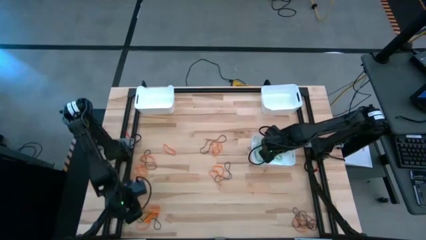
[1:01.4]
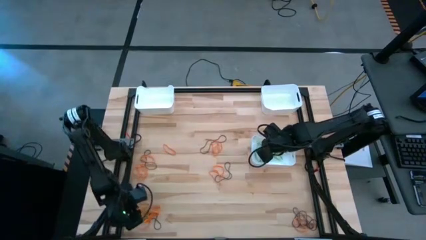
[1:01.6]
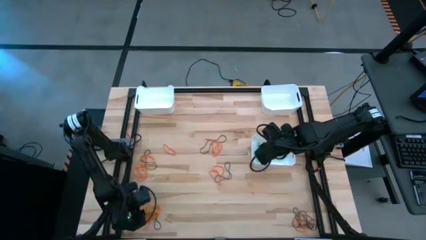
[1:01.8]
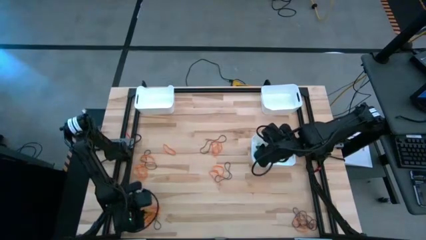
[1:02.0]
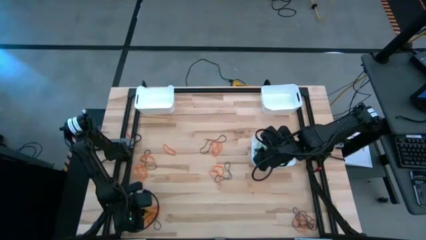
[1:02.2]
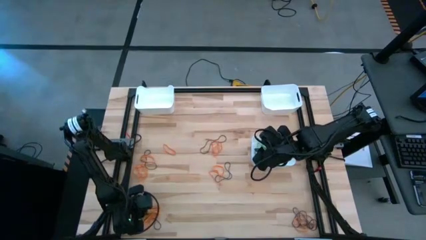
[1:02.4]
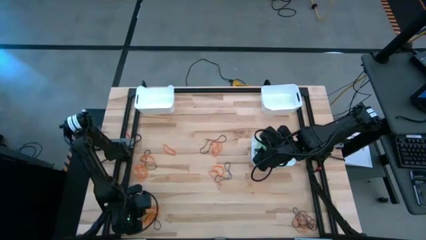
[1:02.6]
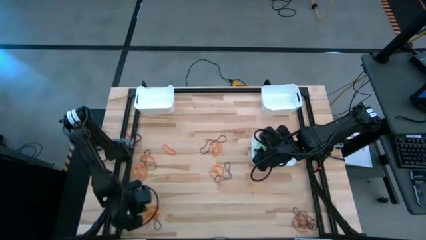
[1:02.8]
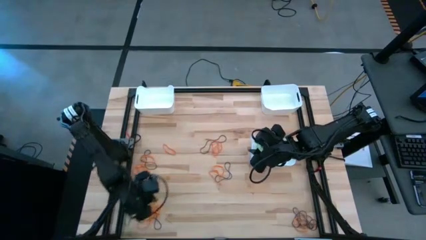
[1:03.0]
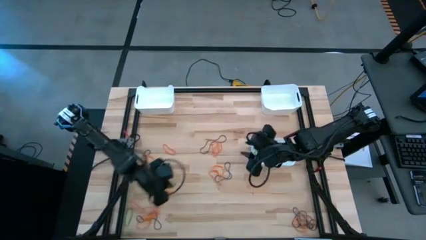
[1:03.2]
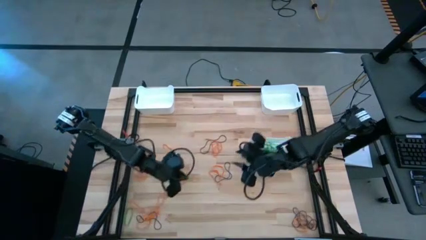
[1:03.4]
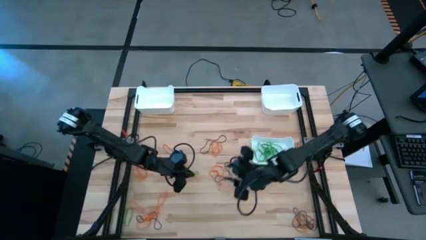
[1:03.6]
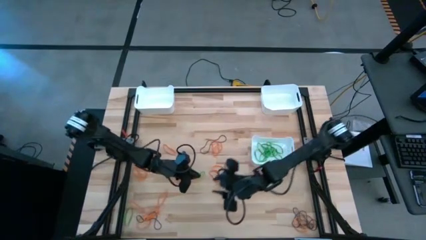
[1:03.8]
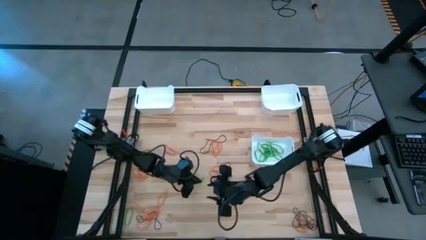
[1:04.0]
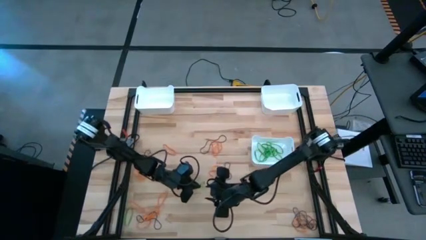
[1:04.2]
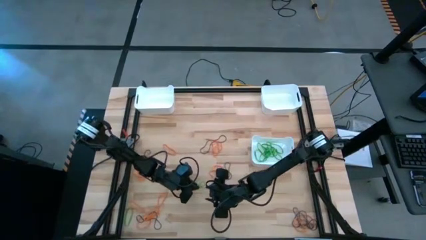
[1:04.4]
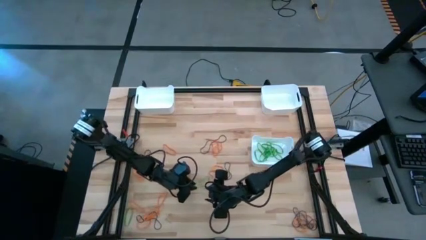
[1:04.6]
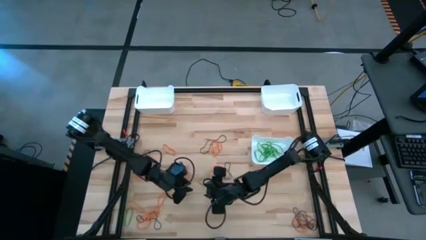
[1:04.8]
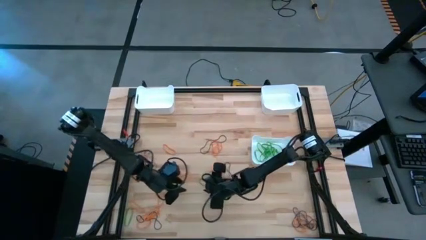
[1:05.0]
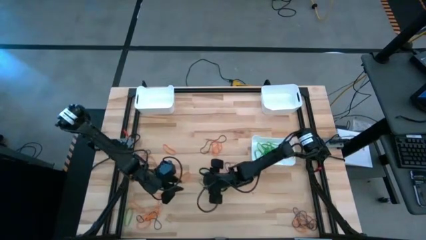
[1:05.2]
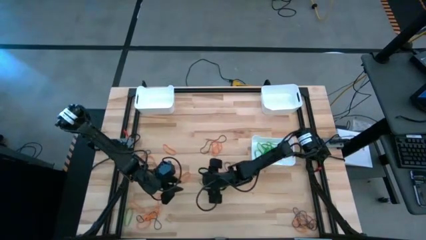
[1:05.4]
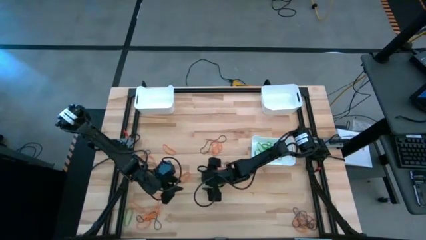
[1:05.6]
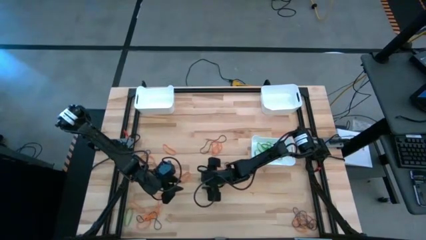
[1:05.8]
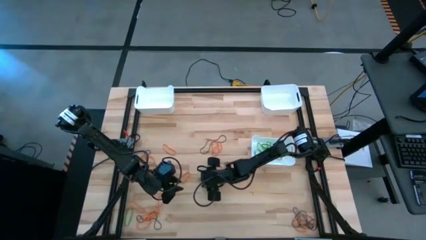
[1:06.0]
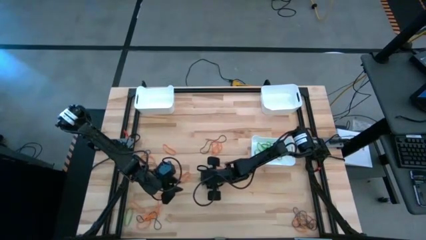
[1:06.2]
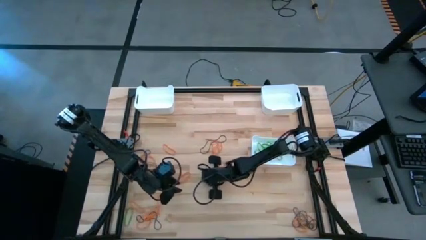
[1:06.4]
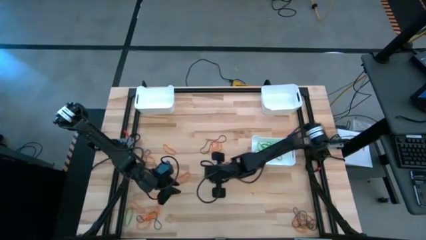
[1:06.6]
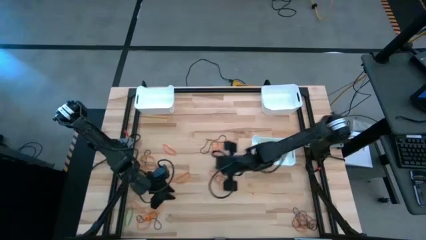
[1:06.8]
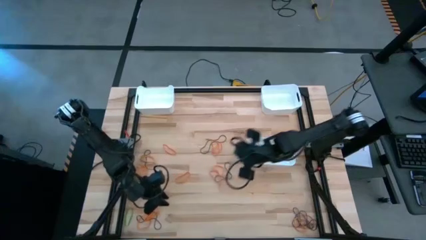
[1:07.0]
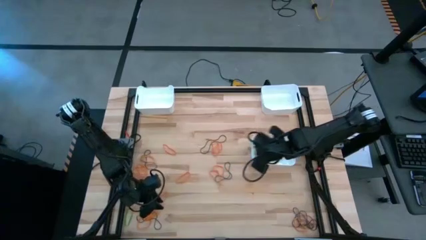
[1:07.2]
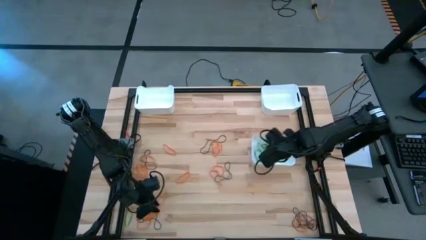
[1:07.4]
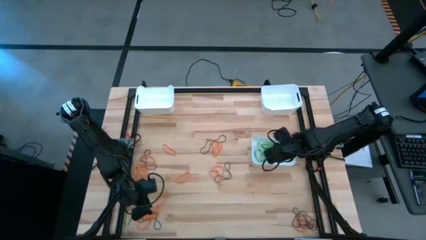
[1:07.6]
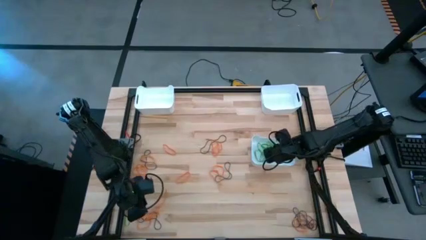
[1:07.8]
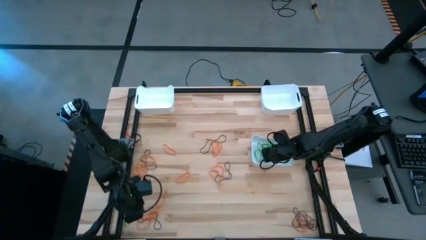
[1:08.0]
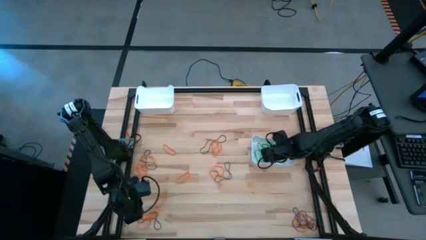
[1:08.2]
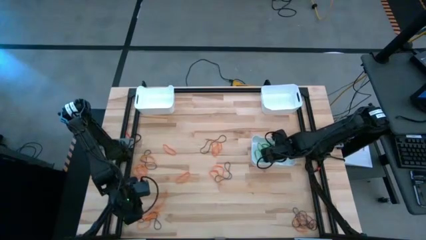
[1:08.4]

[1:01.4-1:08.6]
Task: Sort rubber bands into baskets
Put the green rubber band into the bottom white bin

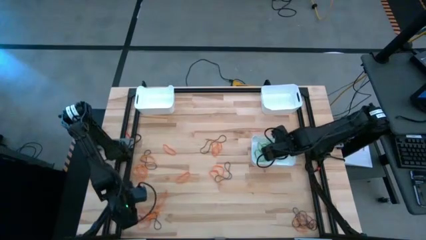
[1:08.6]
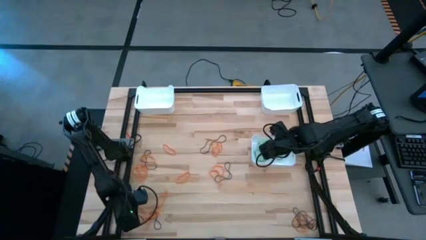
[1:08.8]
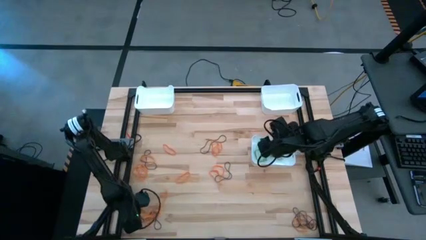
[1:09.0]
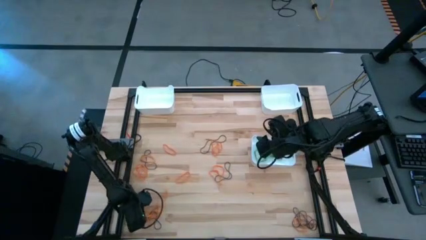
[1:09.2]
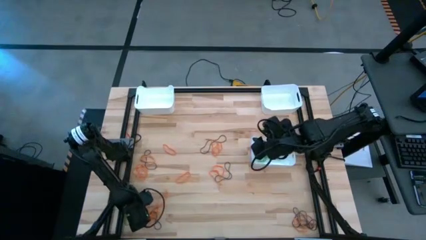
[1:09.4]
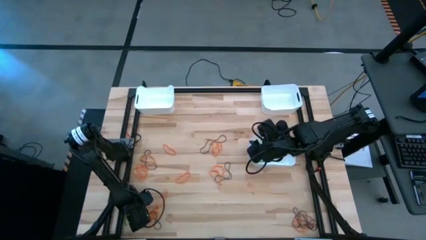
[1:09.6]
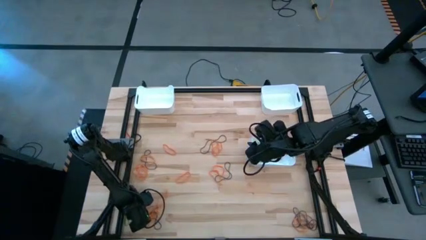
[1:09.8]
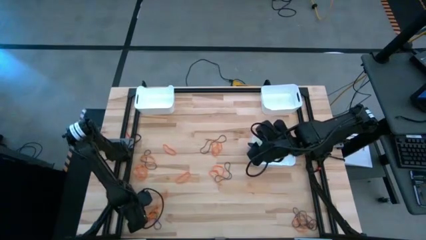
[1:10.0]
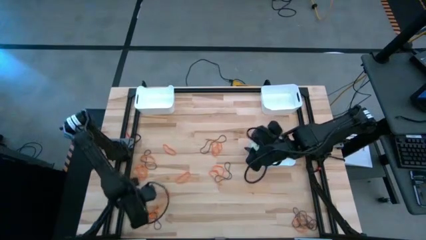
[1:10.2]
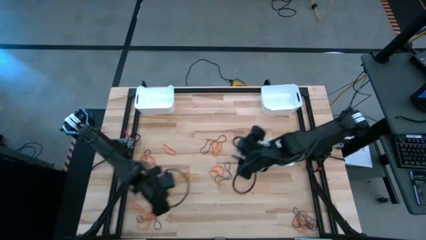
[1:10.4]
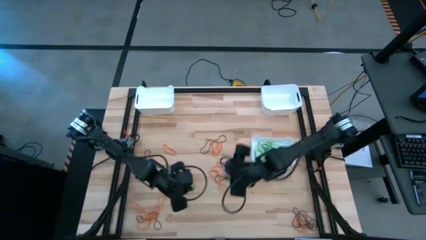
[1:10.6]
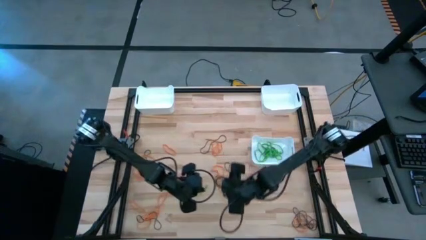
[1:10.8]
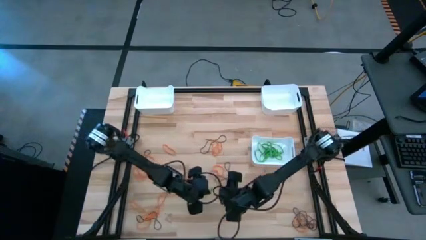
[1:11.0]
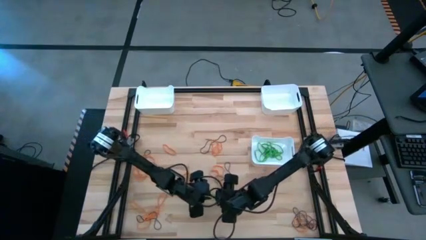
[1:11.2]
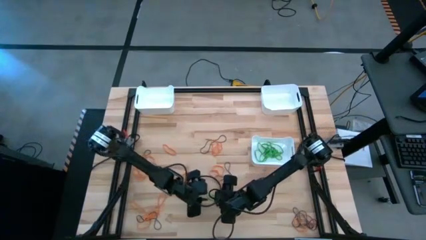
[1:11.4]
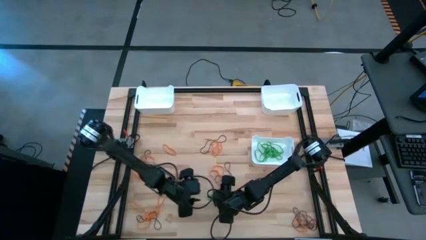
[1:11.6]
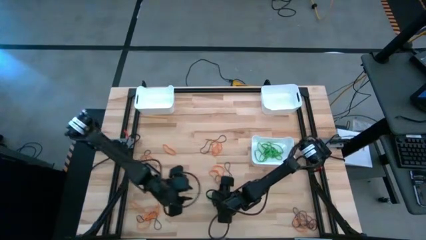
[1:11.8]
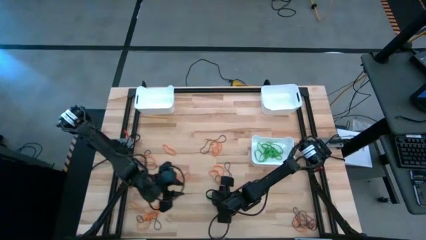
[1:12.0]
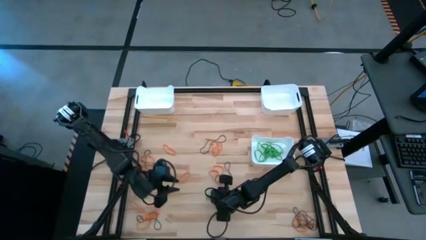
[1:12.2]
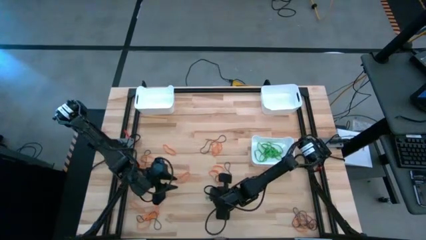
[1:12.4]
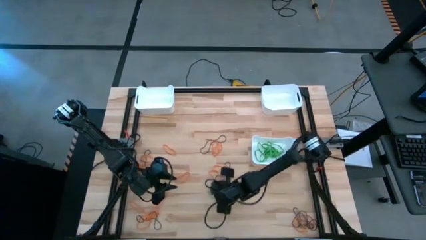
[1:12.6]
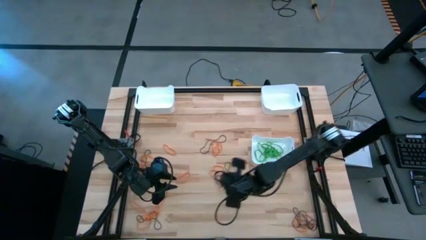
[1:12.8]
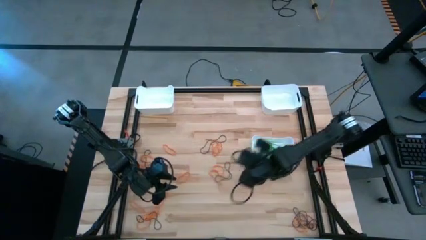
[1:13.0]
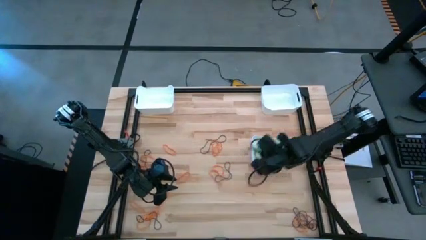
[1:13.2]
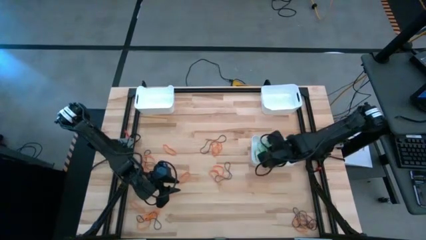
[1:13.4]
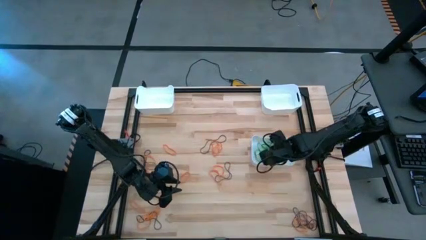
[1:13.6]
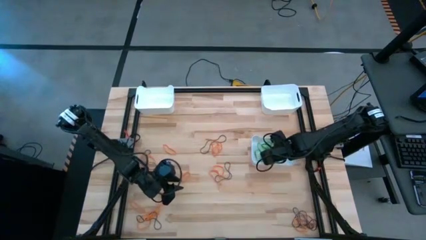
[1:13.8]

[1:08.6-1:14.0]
Put the green rubber band into the bottom white bin

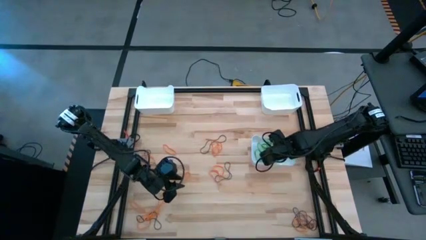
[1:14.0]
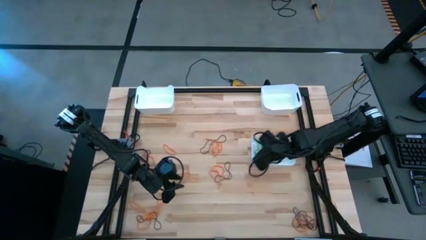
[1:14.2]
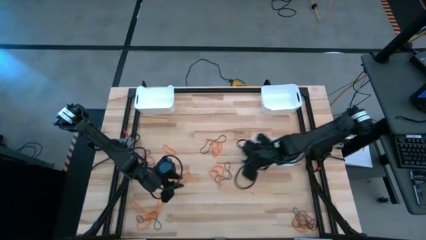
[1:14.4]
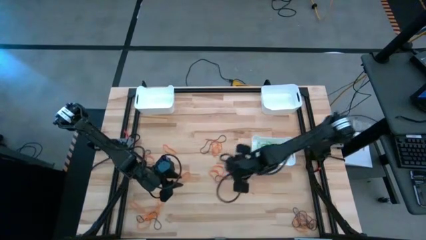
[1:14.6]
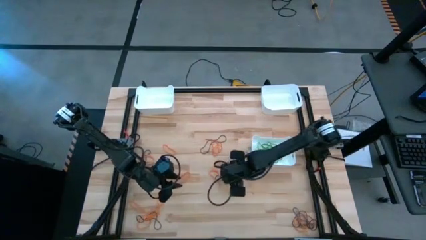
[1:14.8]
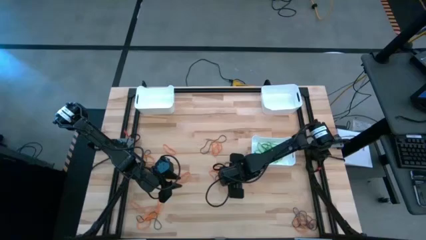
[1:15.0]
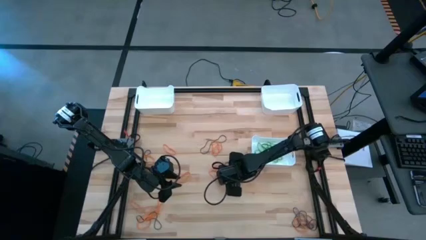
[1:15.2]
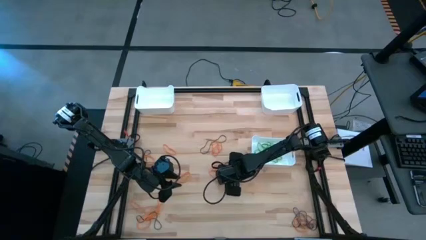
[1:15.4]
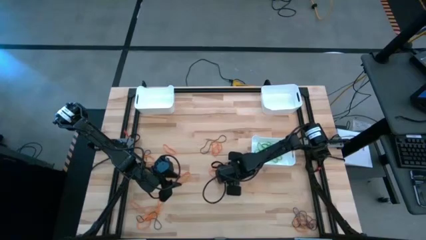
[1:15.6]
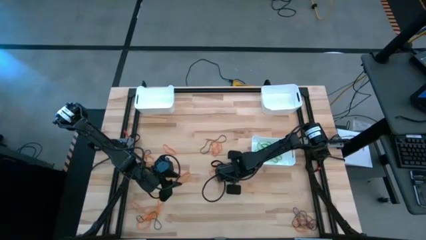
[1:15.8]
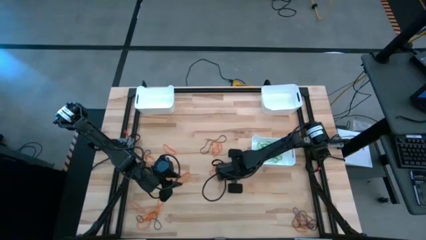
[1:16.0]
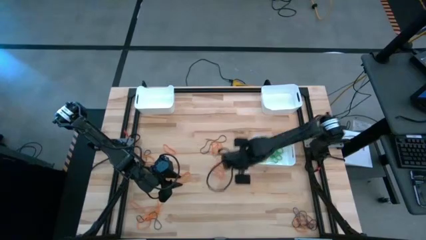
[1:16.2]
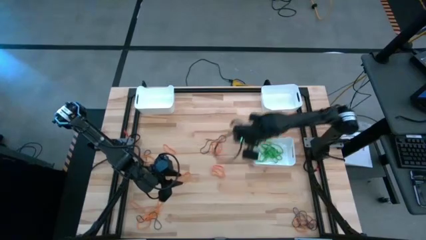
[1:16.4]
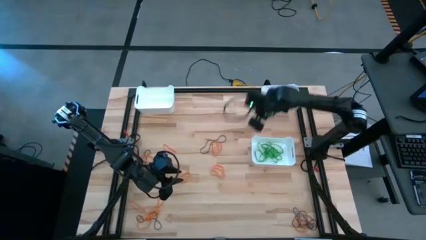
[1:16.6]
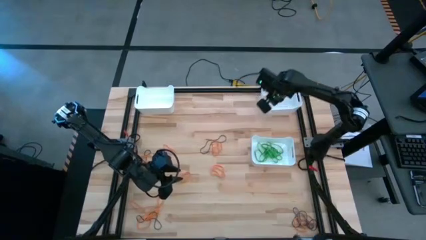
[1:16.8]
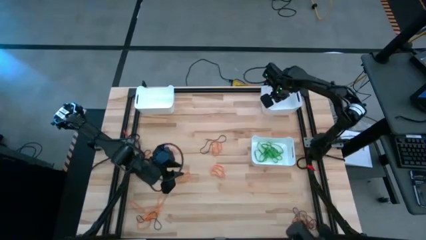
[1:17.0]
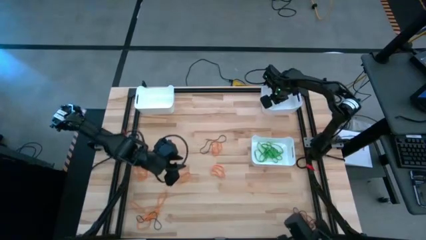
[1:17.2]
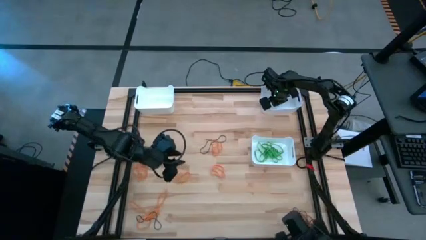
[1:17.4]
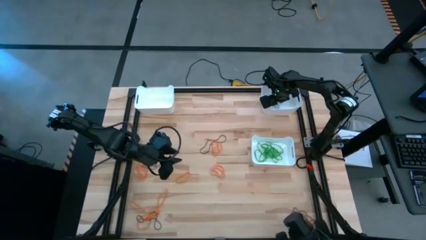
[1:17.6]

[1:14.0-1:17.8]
Put the black rubber band into the top right white bin

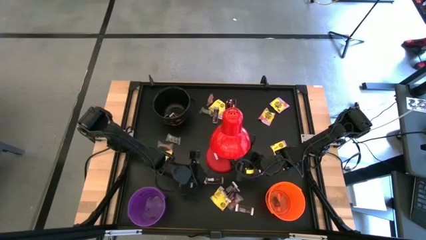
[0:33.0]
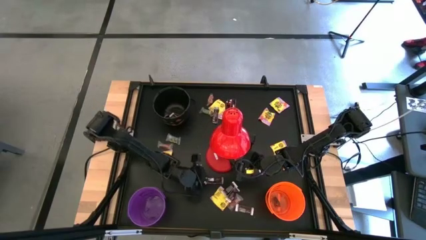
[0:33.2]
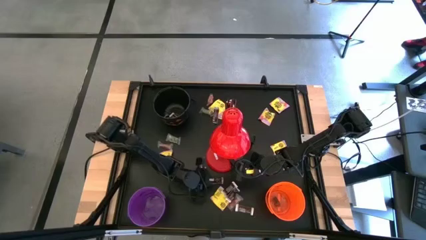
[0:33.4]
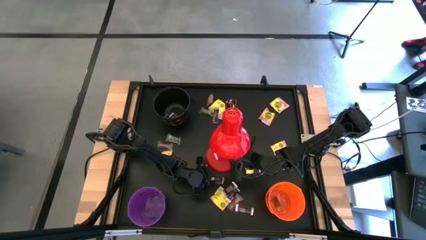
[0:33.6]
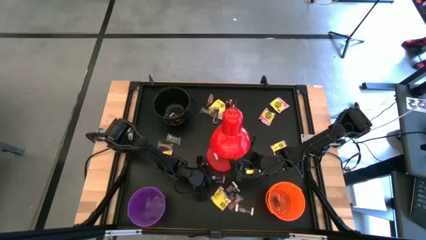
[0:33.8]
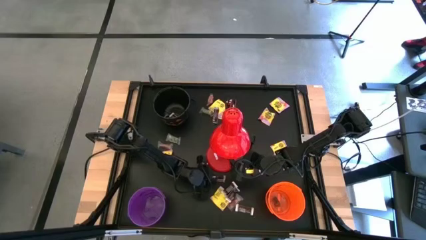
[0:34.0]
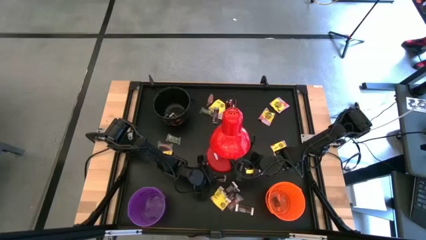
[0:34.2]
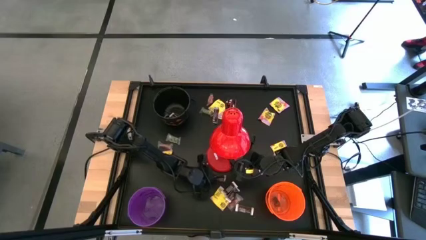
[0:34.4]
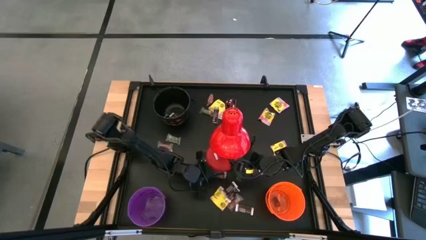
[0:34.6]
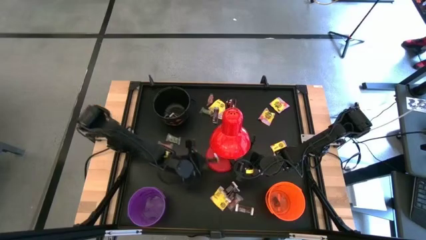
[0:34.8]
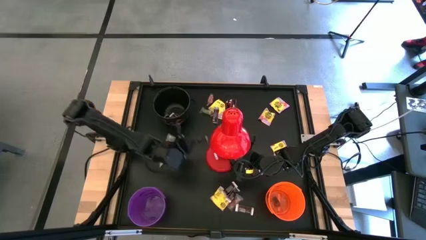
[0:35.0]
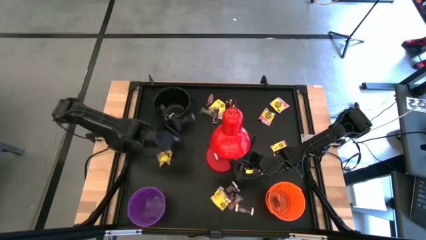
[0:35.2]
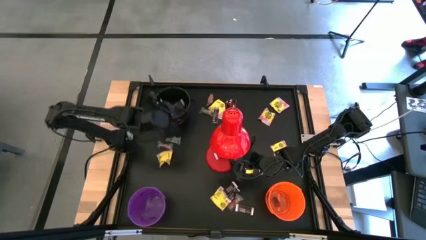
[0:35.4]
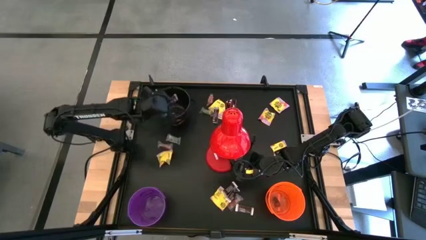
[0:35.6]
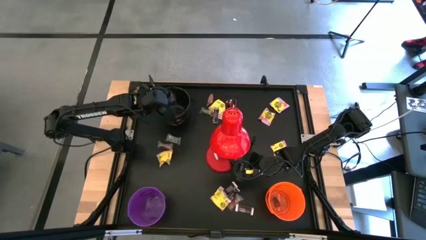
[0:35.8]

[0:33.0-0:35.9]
Task: Organize candy in baskets
Put the brown chocolate bar into the black bucket
